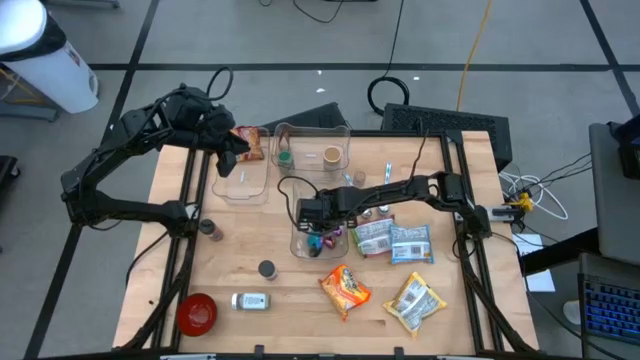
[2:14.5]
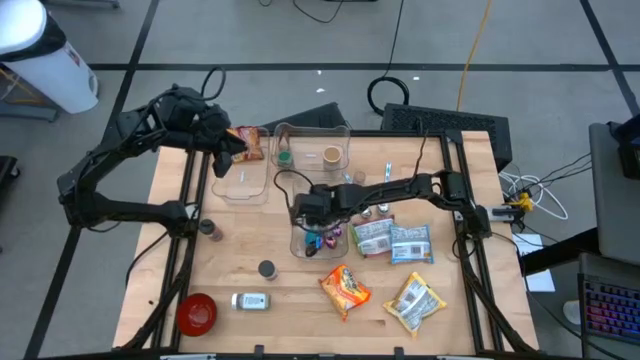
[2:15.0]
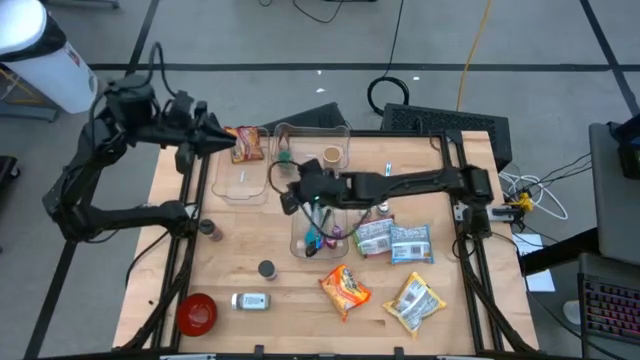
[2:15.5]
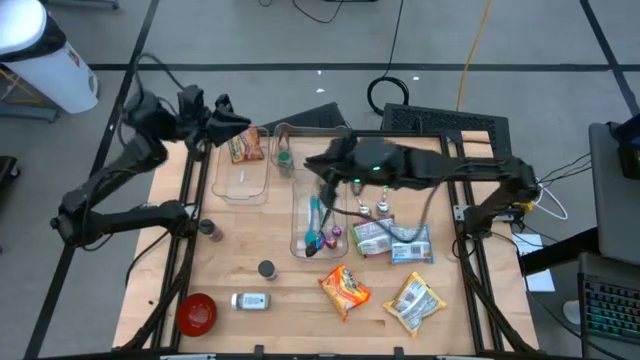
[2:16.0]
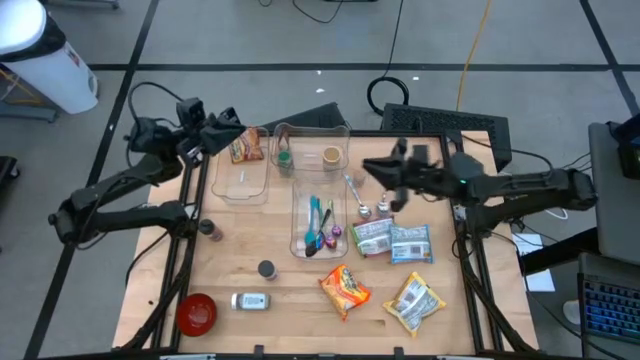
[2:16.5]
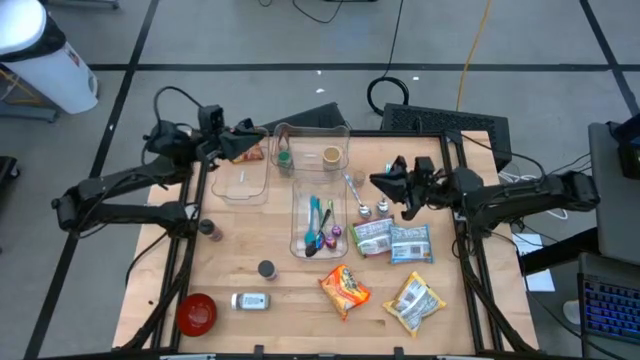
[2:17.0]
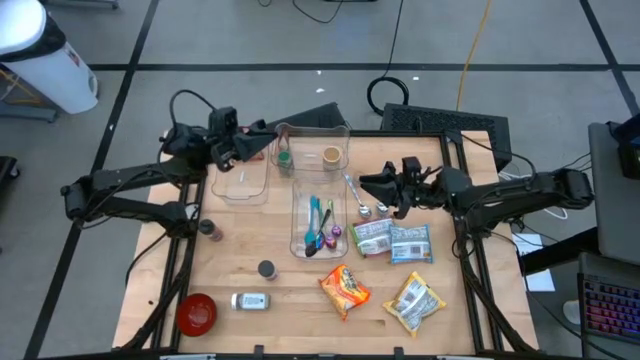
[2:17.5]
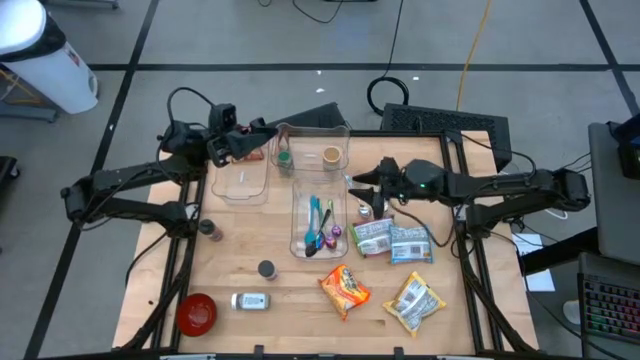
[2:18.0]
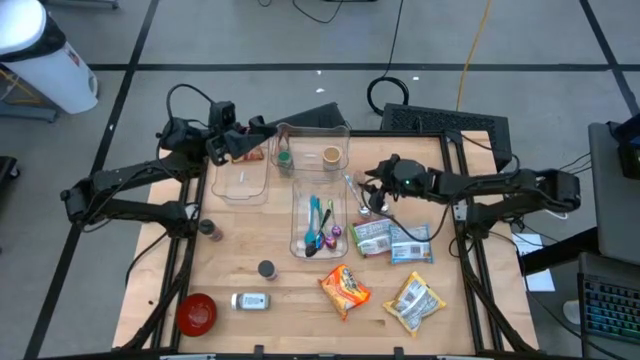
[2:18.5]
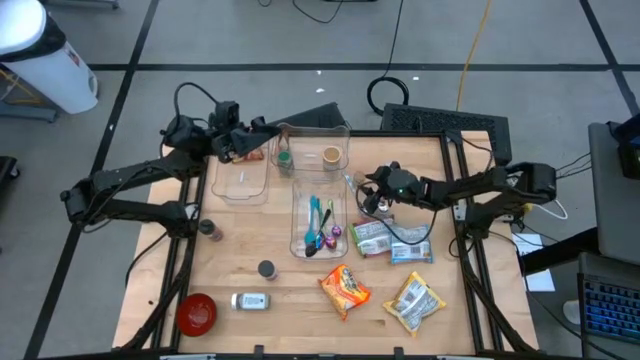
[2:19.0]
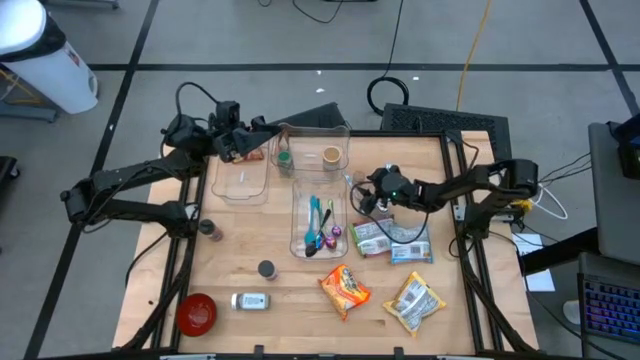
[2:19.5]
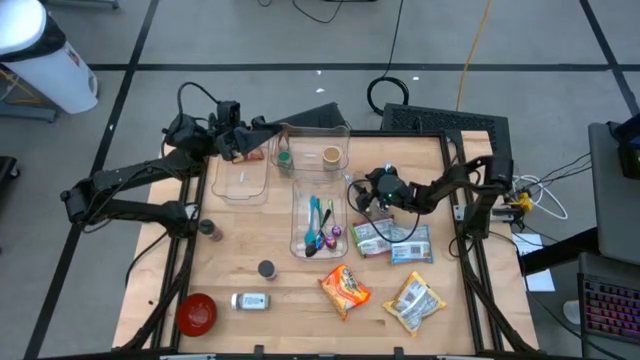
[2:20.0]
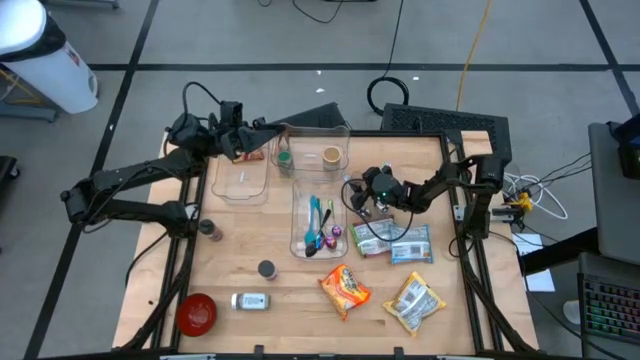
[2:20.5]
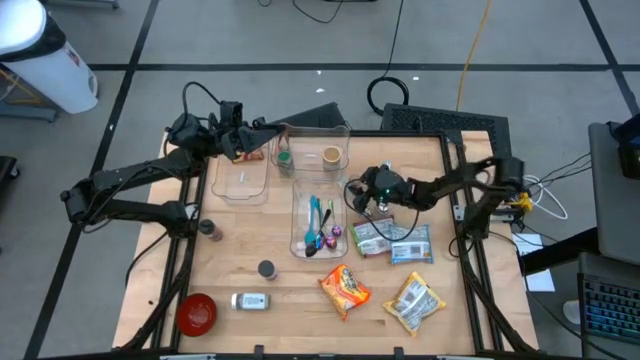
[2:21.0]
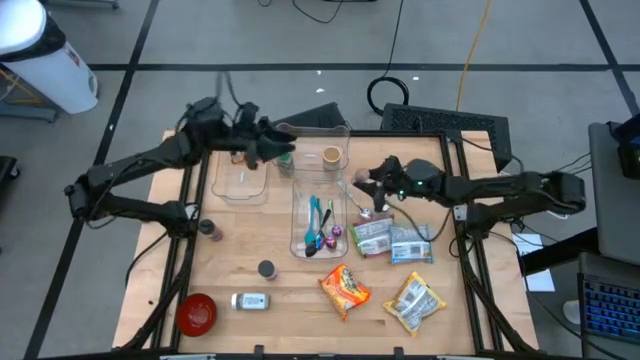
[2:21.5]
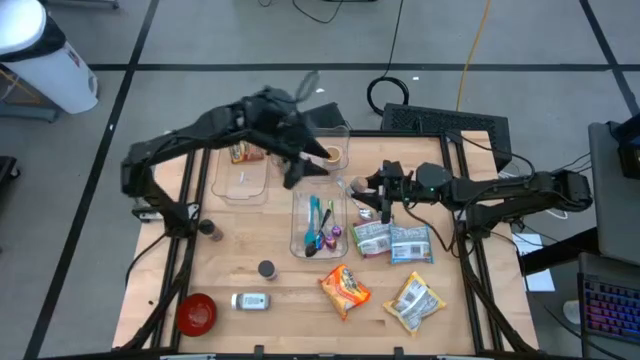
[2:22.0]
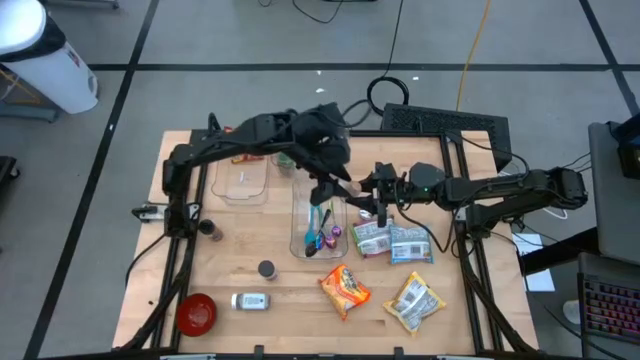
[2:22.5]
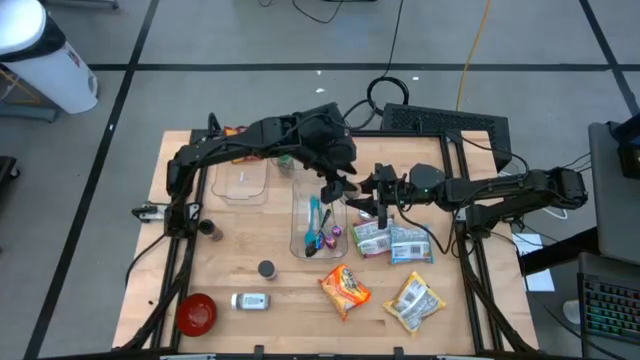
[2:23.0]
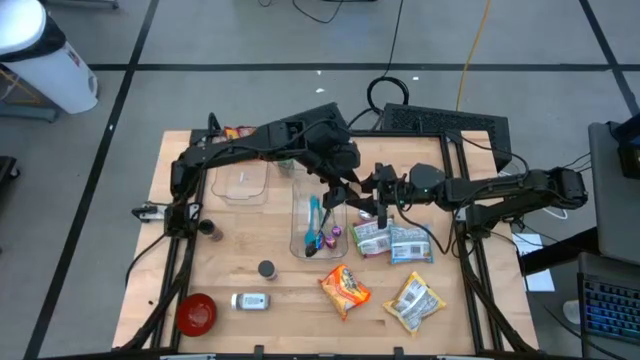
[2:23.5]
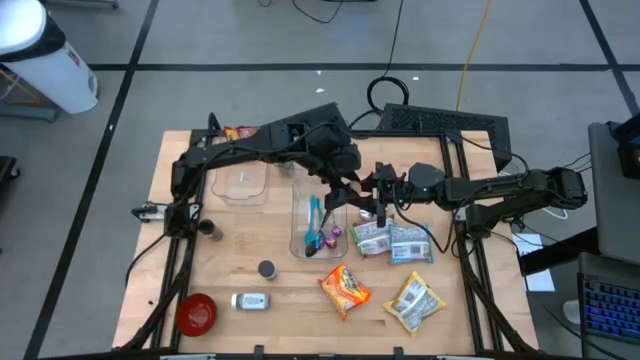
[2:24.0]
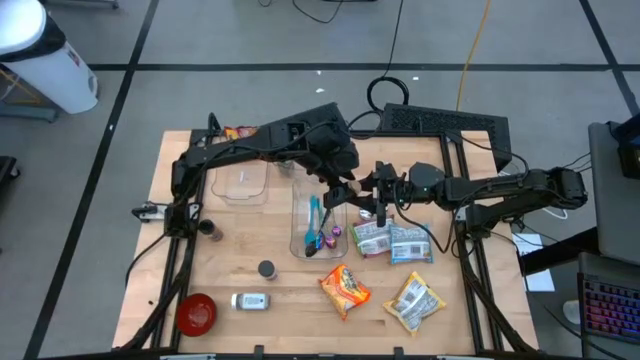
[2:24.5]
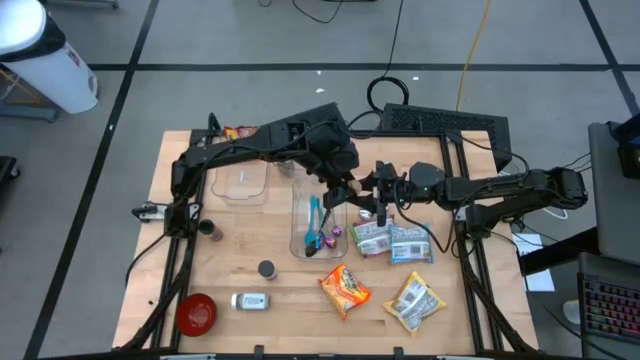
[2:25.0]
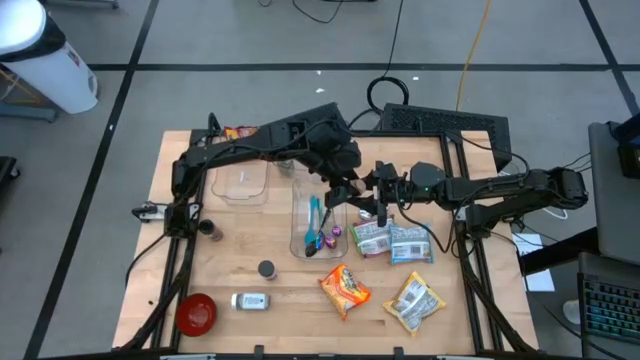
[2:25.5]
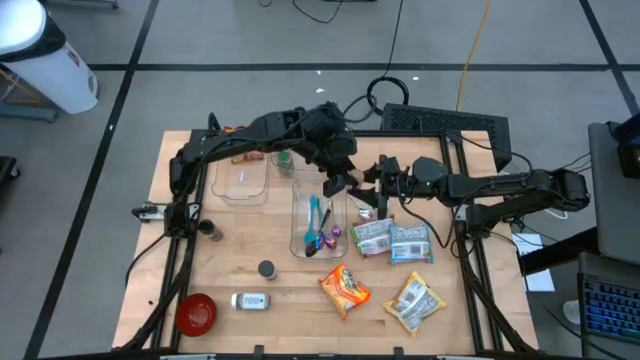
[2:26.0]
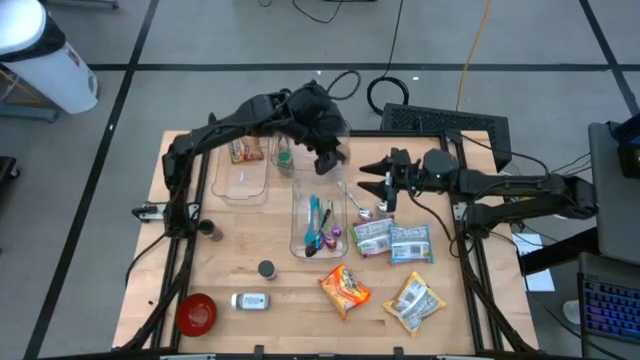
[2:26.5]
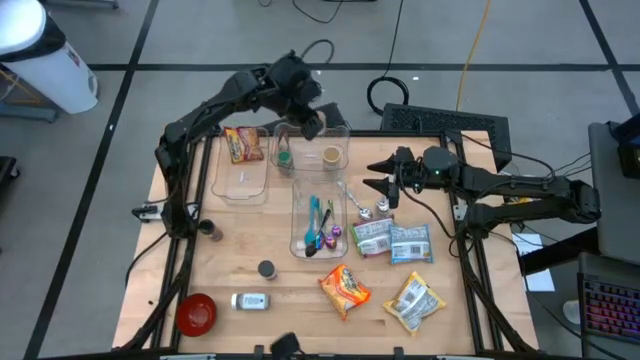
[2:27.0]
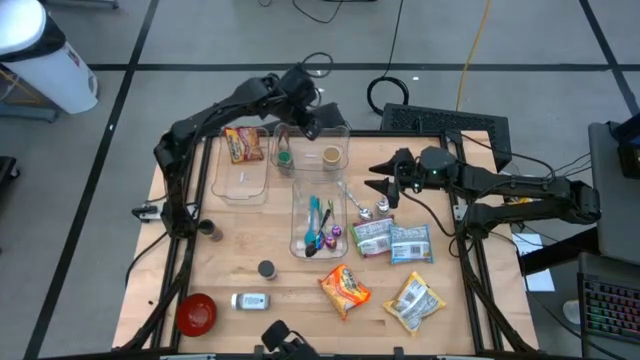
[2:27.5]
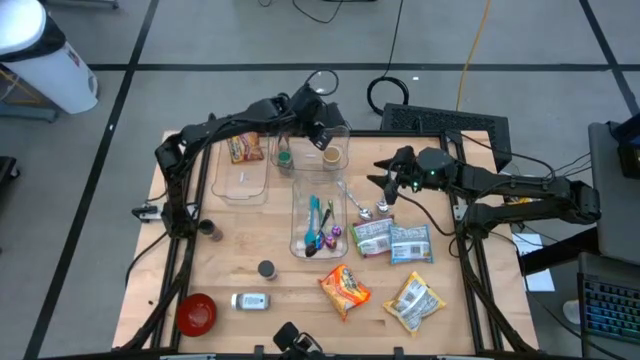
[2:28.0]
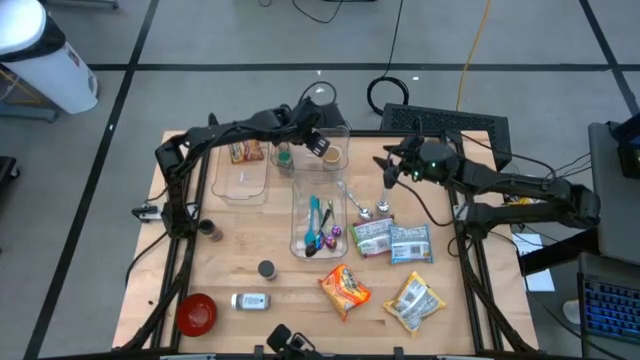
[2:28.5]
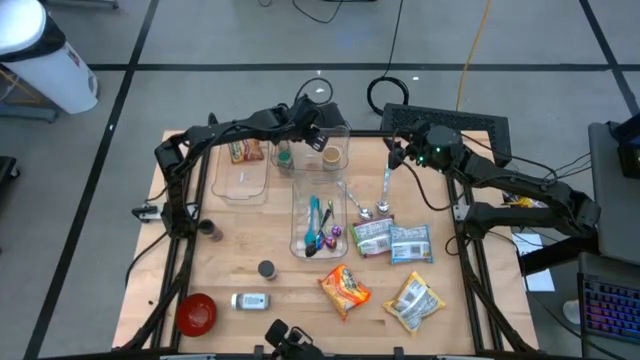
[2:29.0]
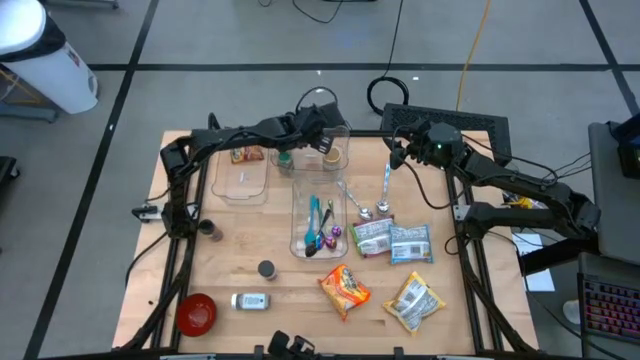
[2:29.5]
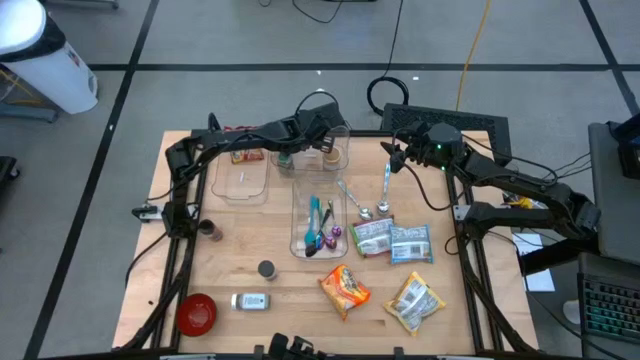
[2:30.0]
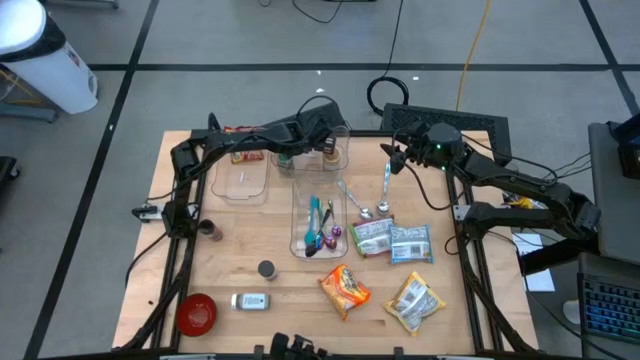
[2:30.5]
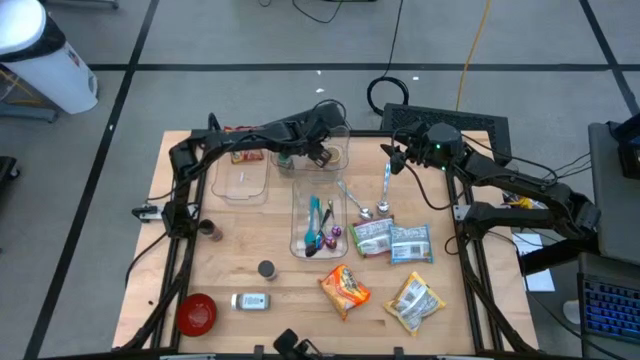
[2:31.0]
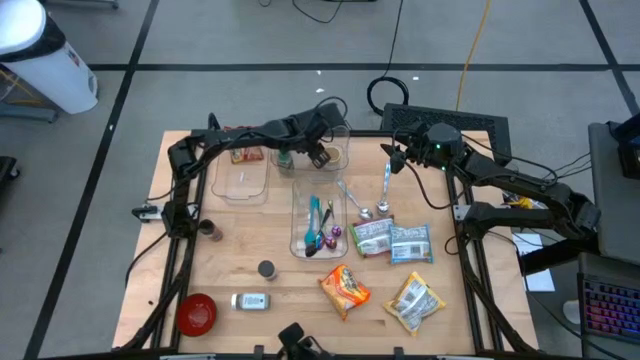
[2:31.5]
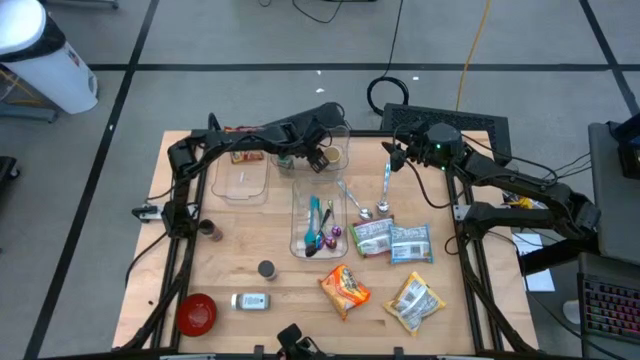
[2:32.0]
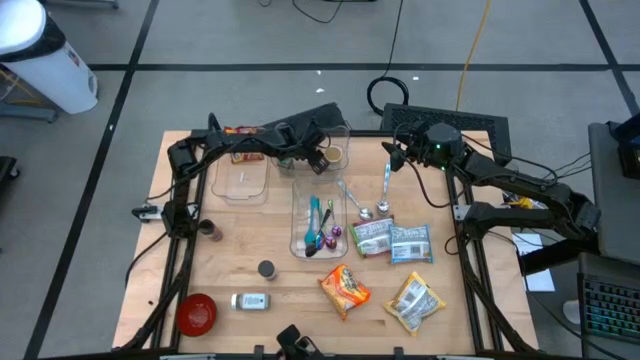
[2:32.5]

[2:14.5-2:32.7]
Task: Pick & Place Food Item
Put the brown seasoning bottle into the top right transparent bin
